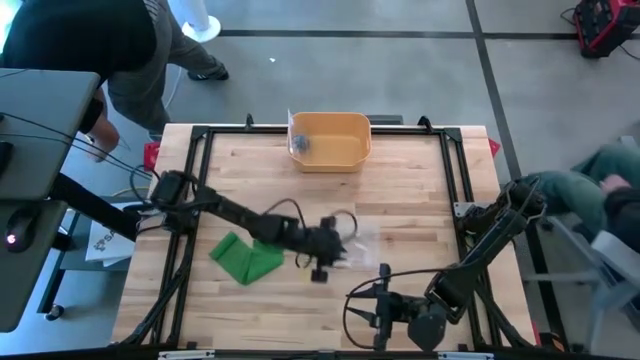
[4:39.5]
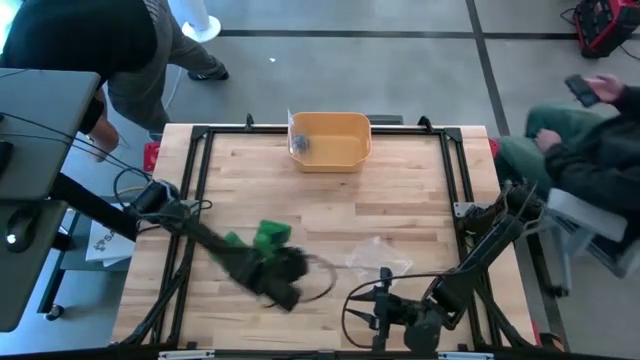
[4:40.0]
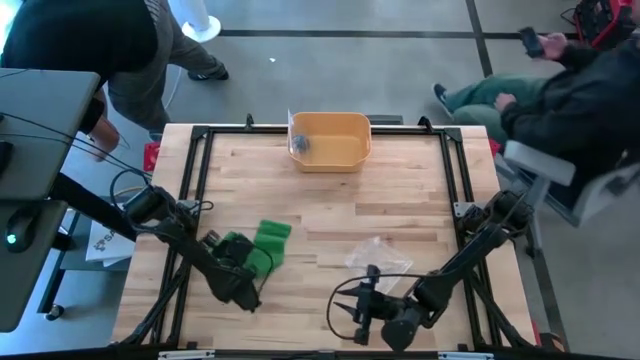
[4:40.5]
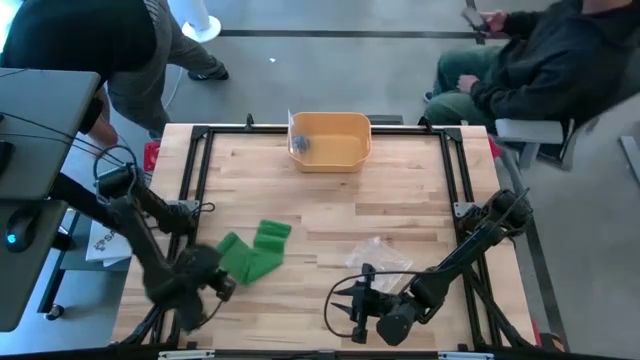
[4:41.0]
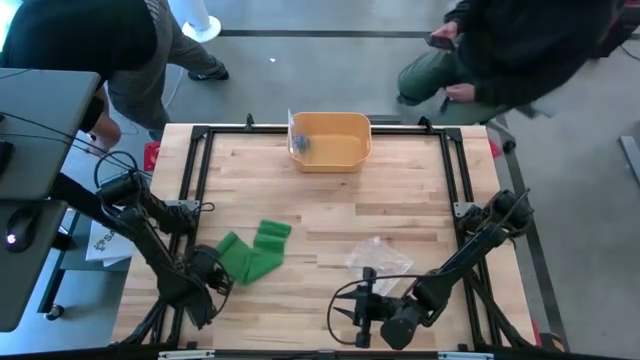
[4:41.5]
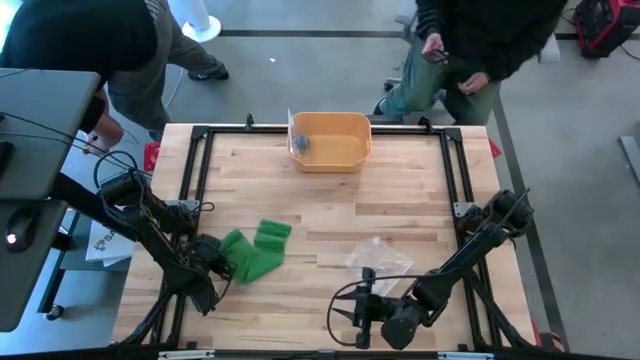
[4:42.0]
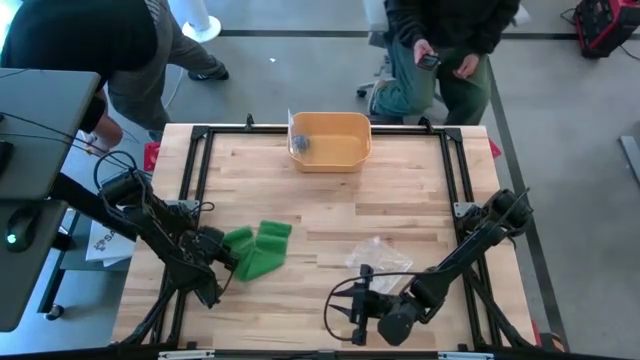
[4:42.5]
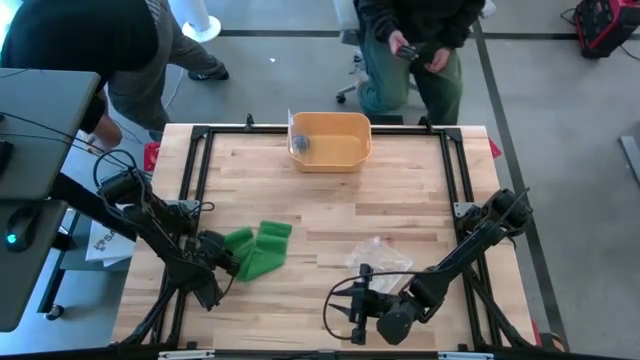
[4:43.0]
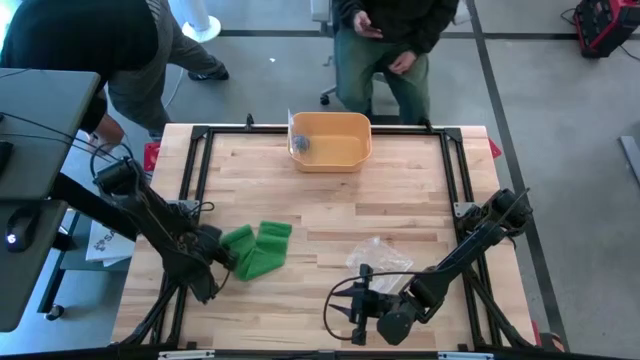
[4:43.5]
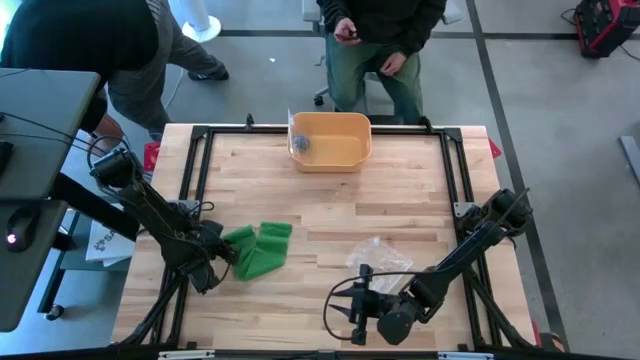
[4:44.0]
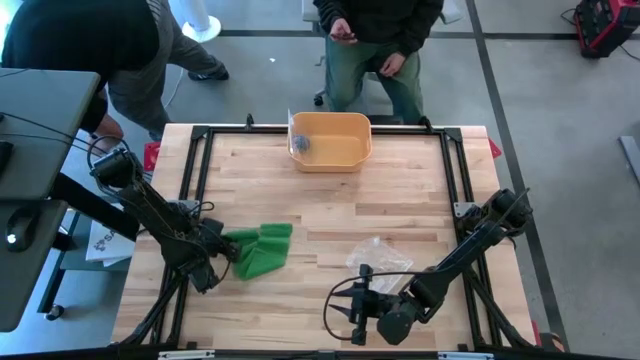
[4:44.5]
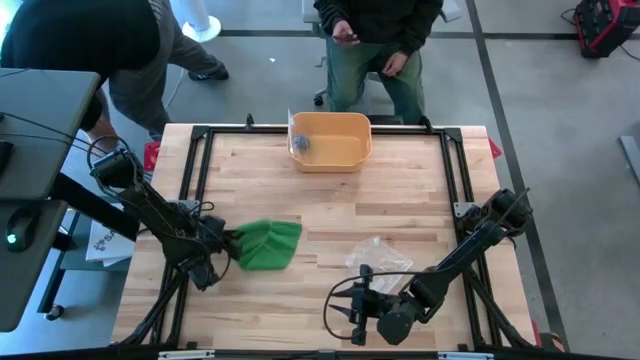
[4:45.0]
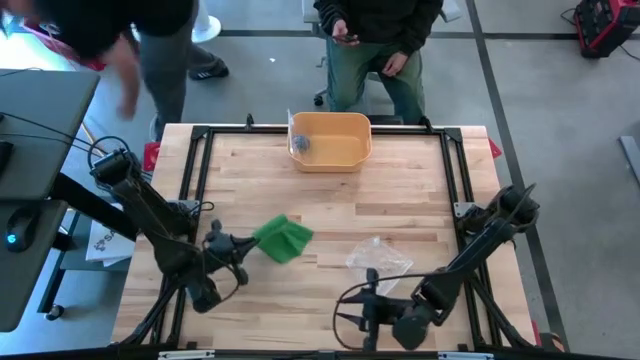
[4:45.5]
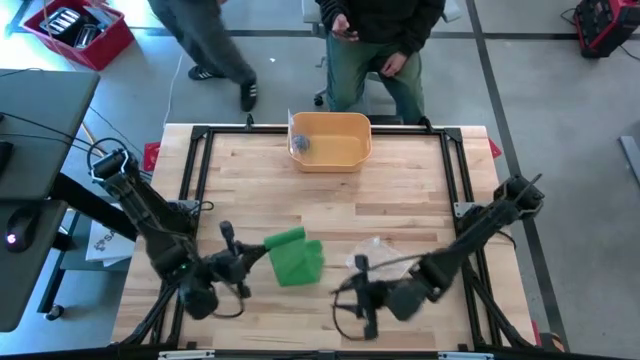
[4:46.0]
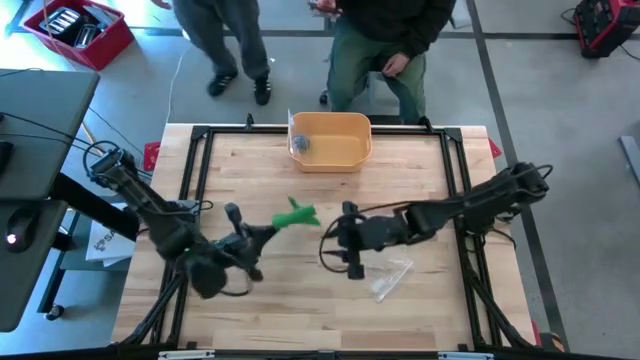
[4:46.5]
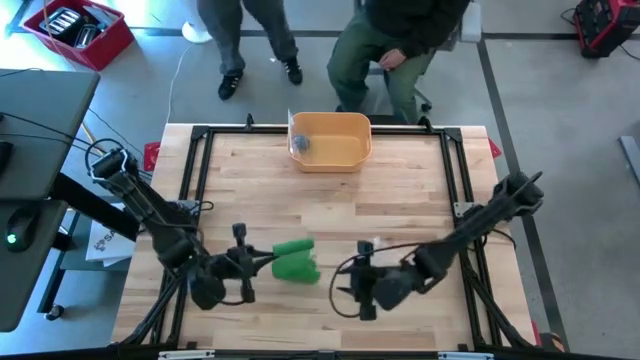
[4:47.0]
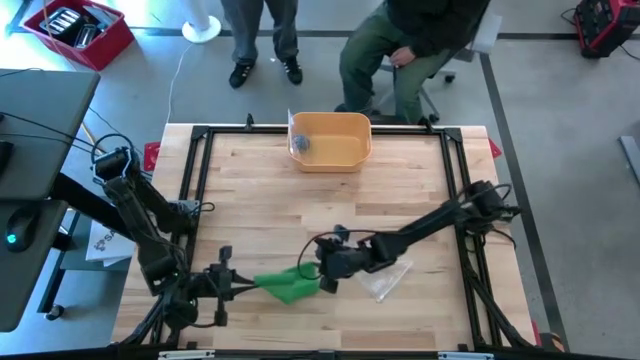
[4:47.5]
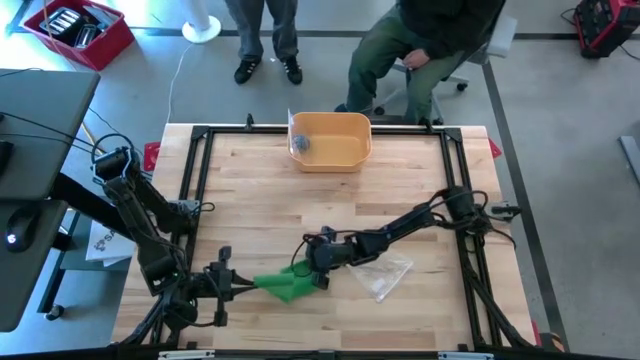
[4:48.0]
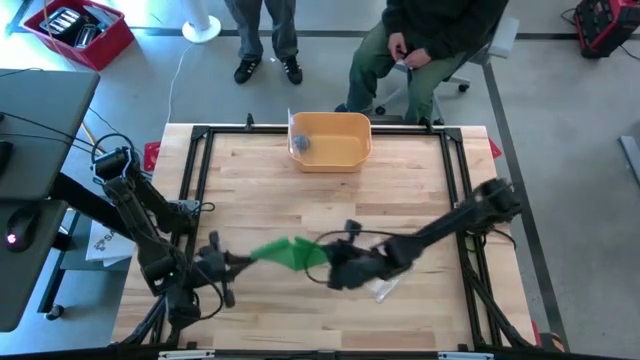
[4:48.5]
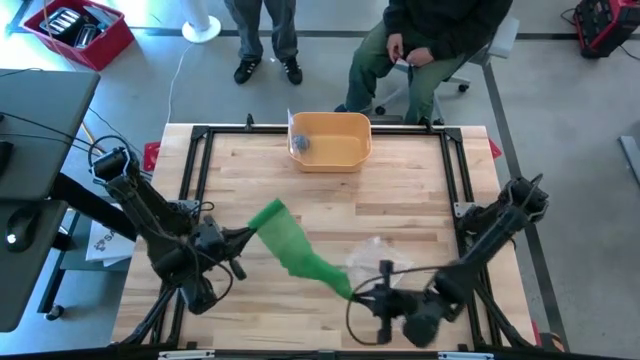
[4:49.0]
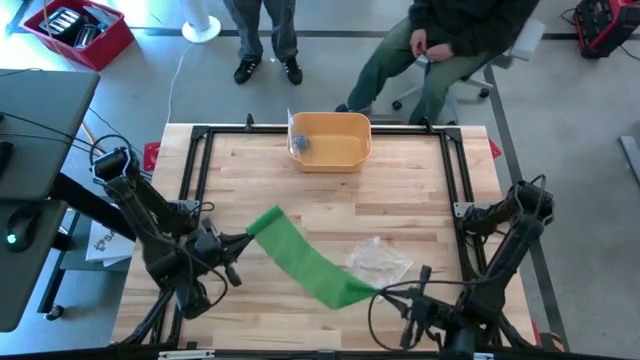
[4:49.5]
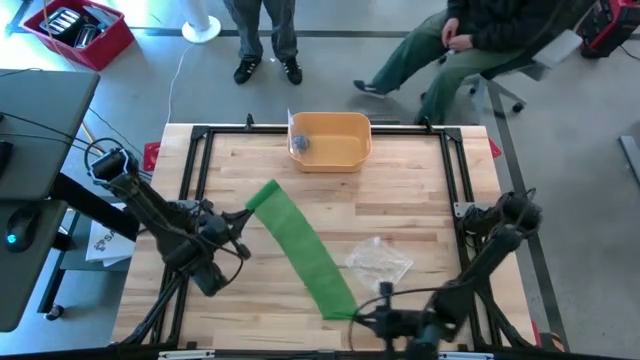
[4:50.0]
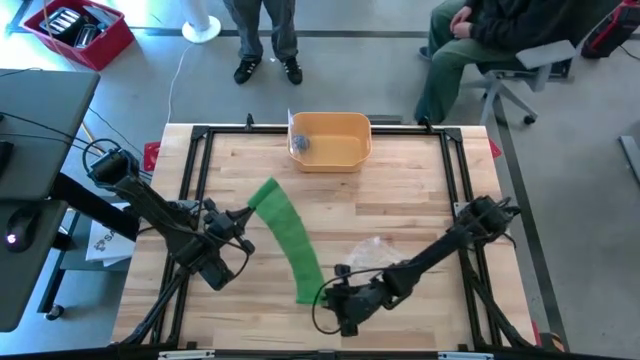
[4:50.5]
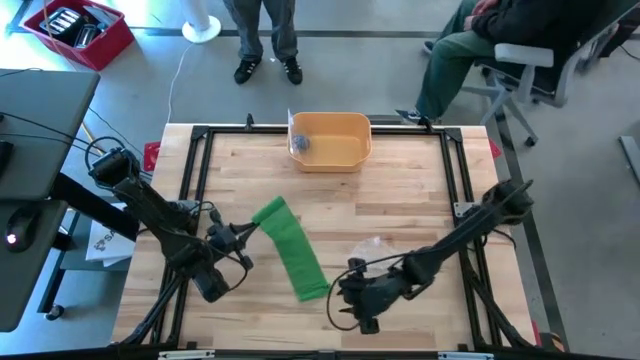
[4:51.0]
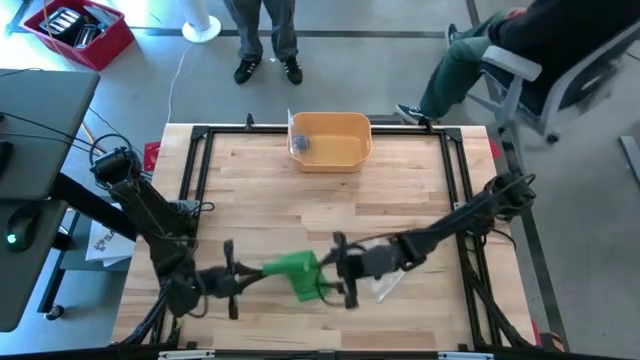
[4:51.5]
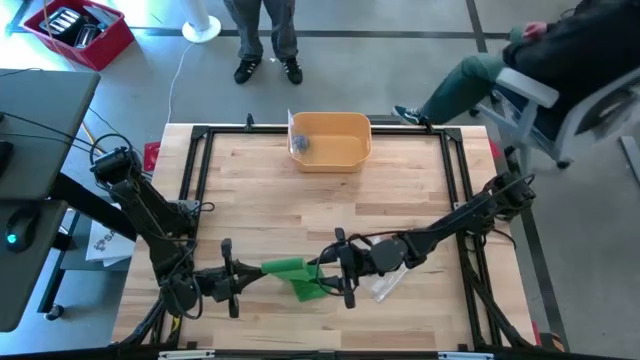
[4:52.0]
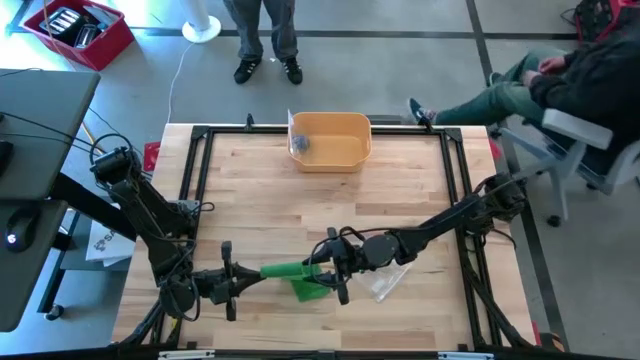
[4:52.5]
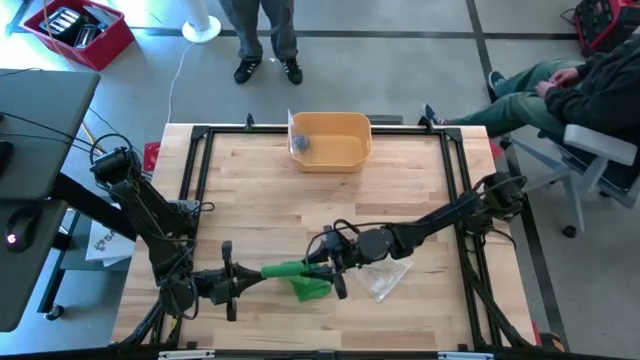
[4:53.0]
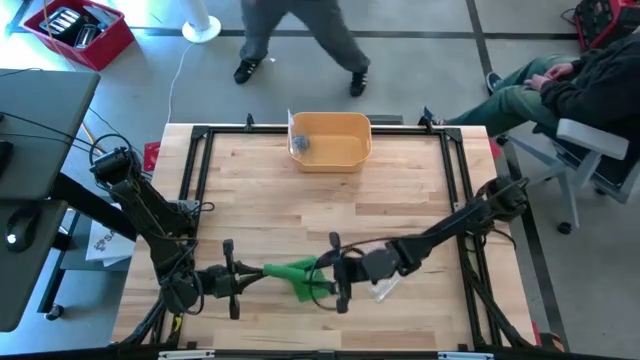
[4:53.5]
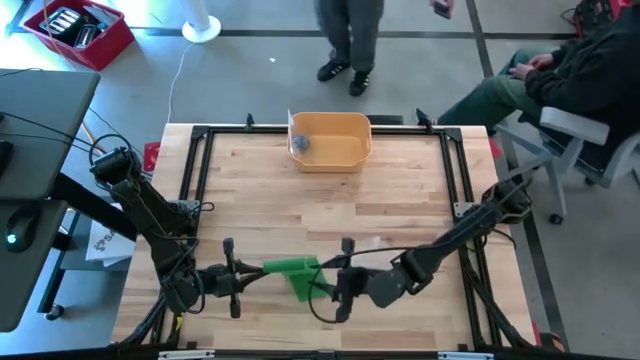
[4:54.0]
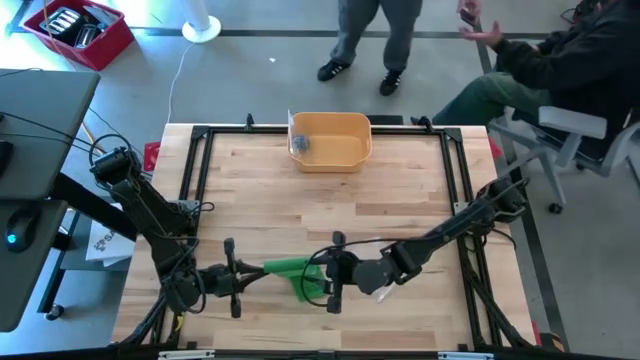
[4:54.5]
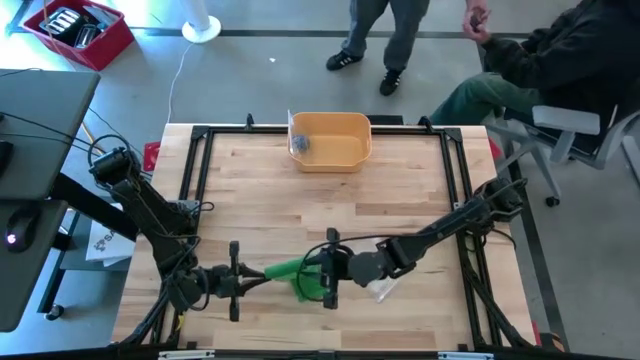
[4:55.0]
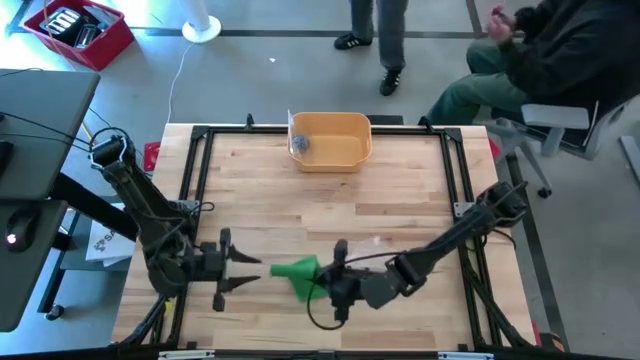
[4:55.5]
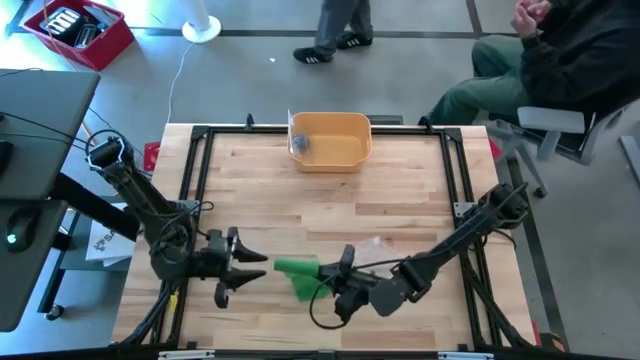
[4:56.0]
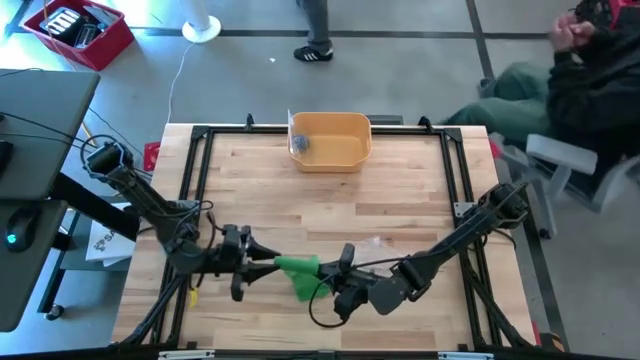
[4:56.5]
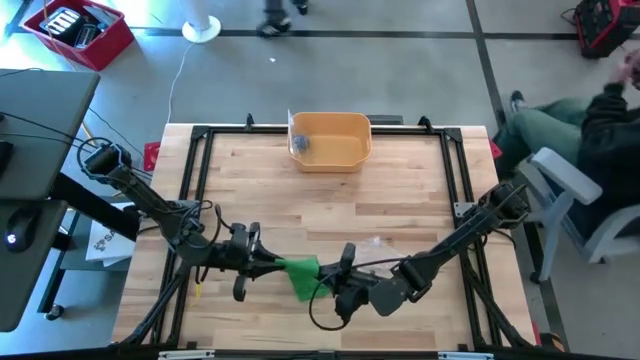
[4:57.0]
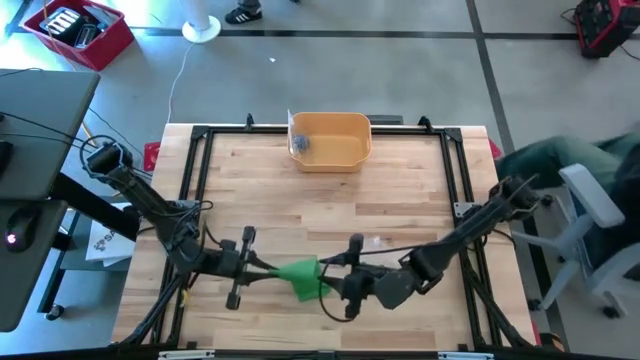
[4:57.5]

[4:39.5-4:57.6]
Task: Roll bandage
Roll the green bandage

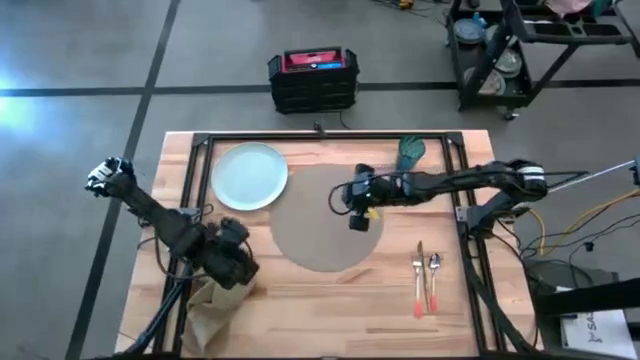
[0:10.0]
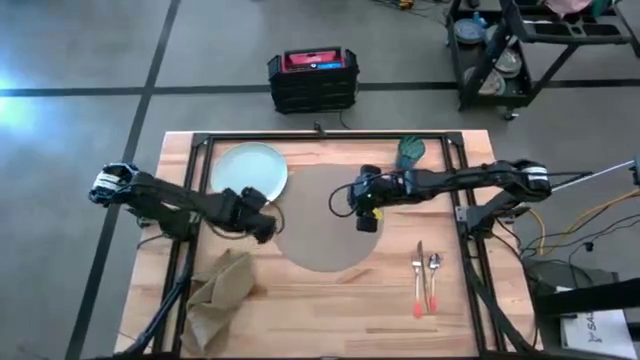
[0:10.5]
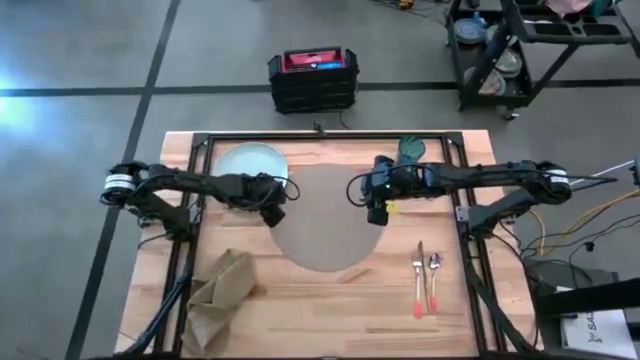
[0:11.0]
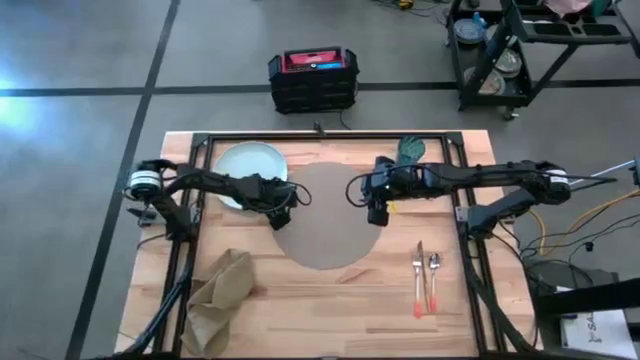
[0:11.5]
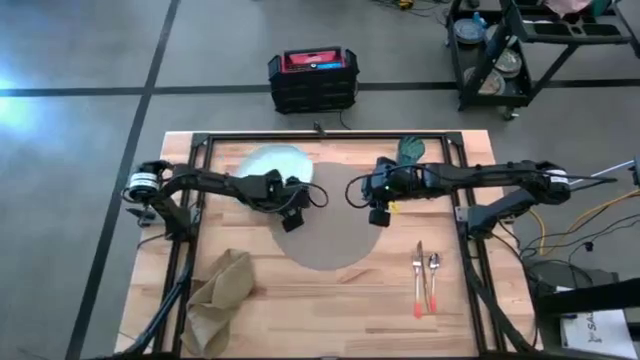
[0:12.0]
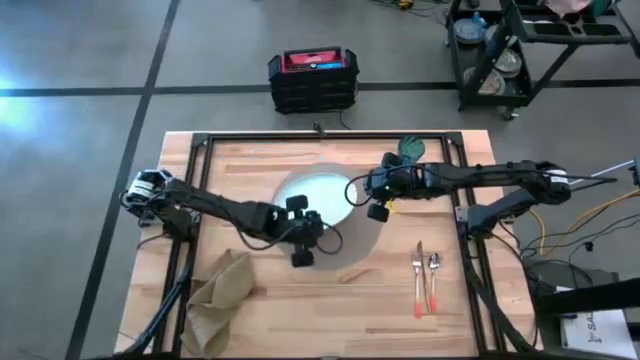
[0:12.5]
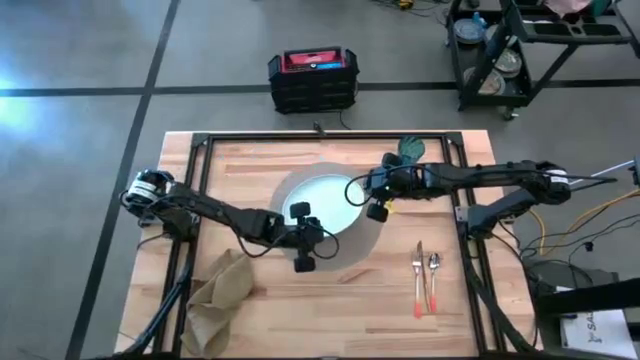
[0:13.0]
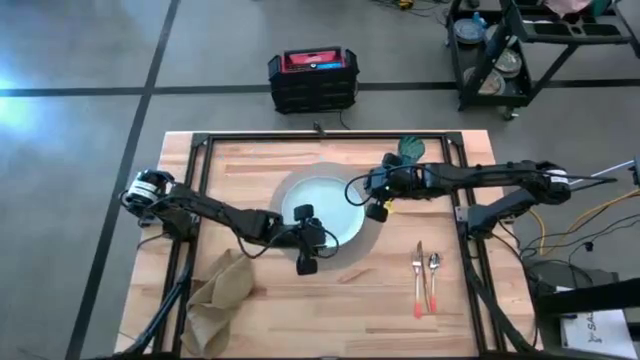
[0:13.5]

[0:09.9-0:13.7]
Task: Set table place
Put the white plate on the table mat

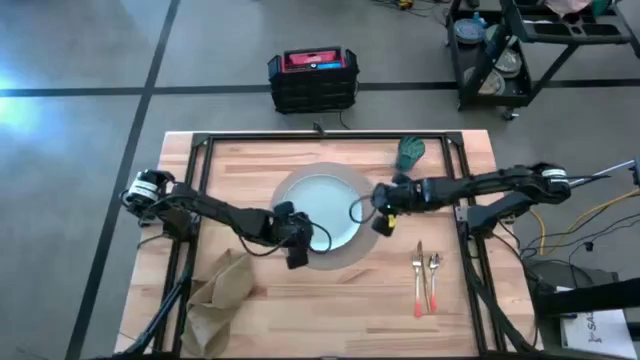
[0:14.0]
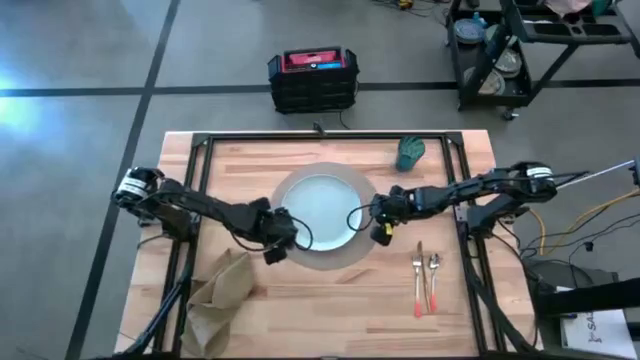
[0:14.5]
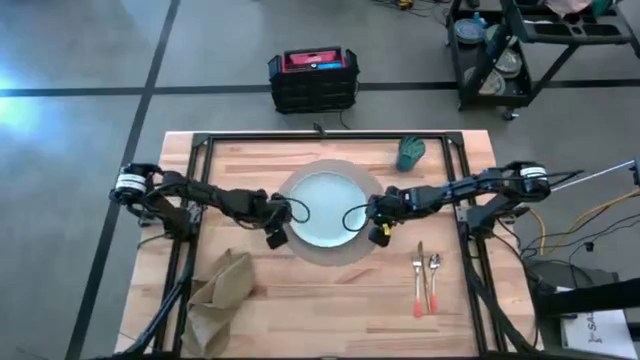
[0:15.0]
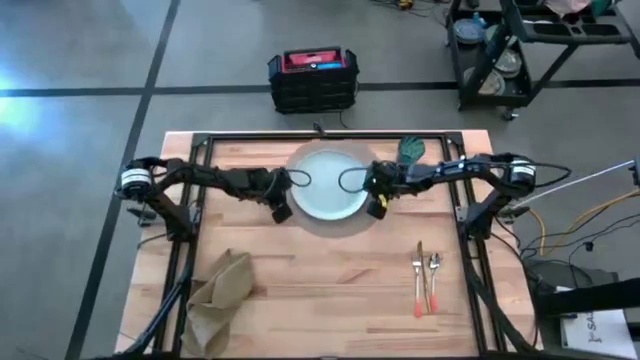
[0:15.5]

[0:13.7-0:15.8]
Adjust the table mat to the top of the table
